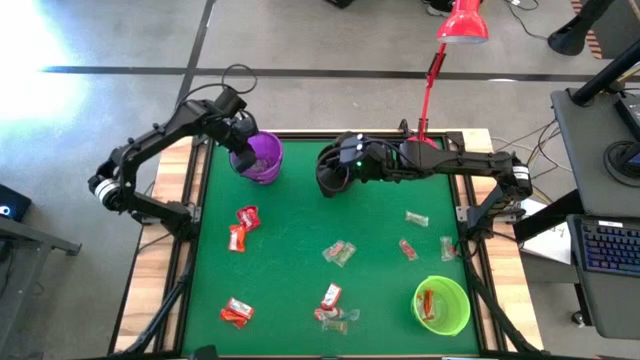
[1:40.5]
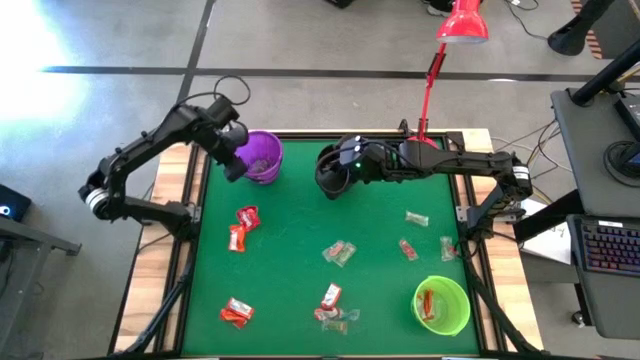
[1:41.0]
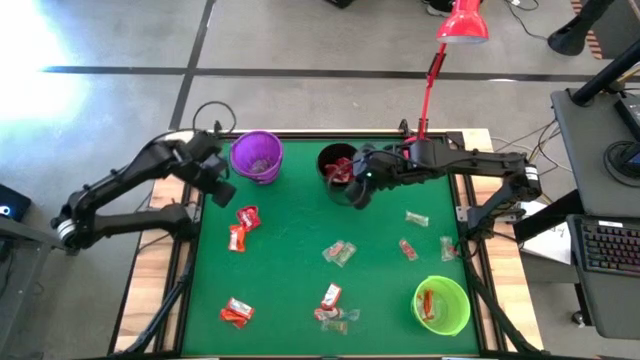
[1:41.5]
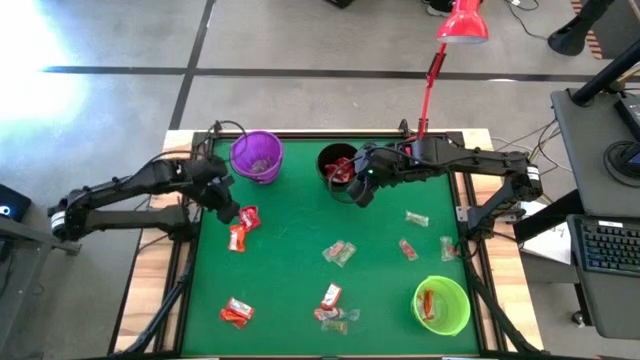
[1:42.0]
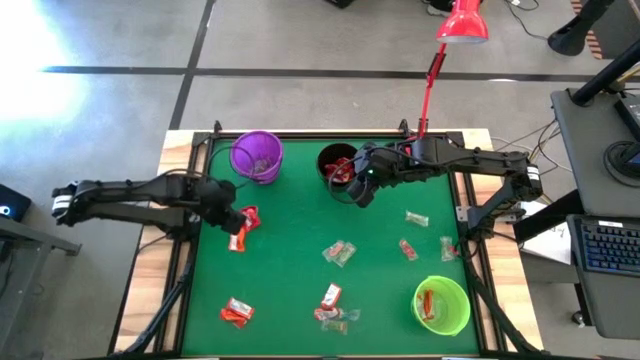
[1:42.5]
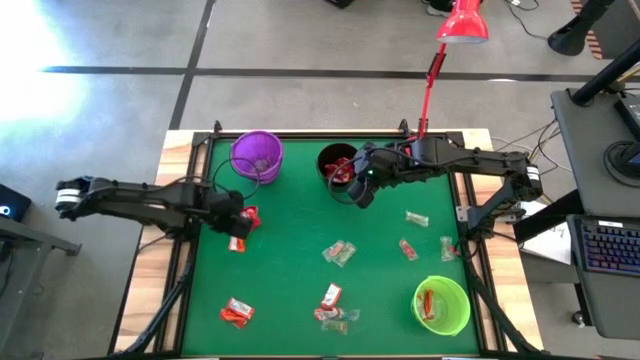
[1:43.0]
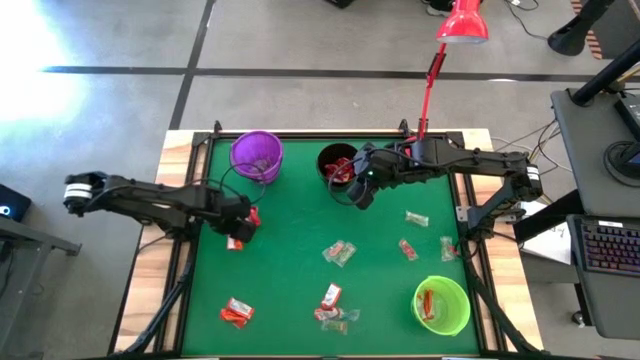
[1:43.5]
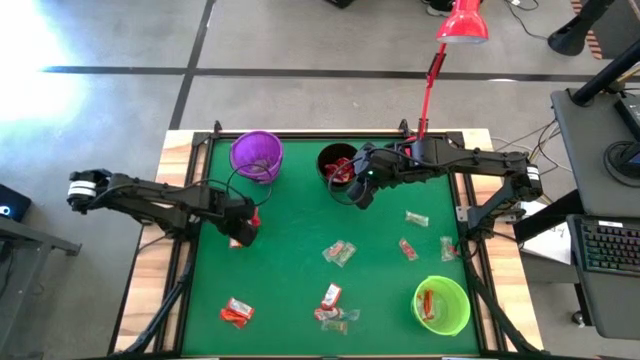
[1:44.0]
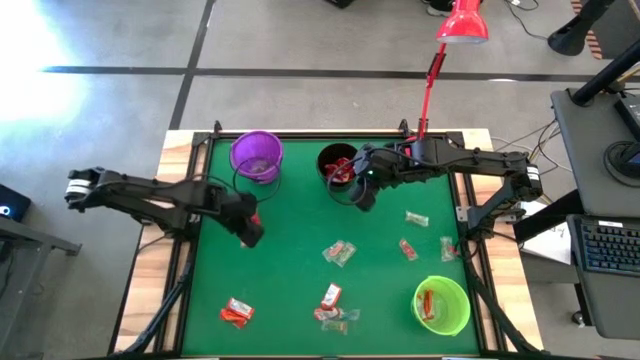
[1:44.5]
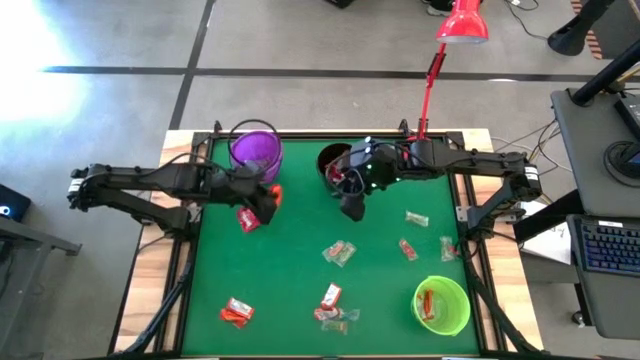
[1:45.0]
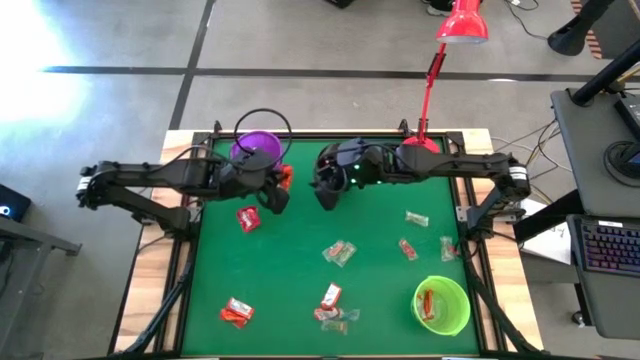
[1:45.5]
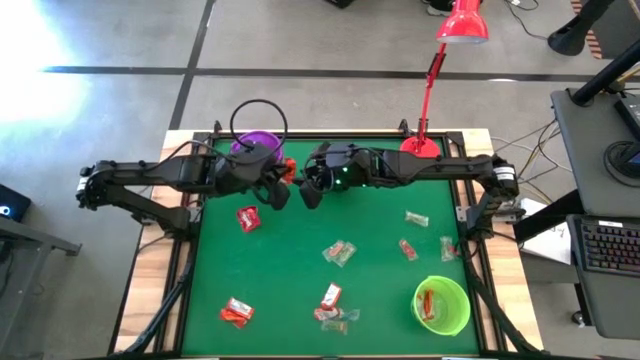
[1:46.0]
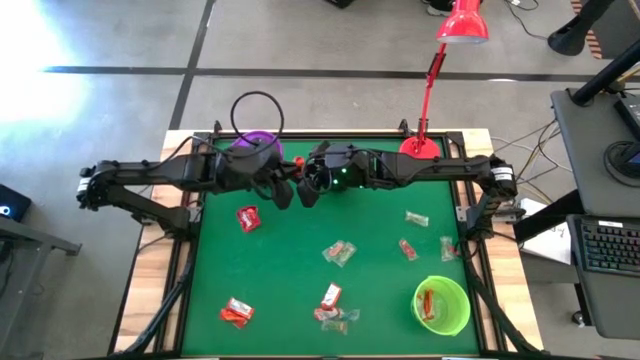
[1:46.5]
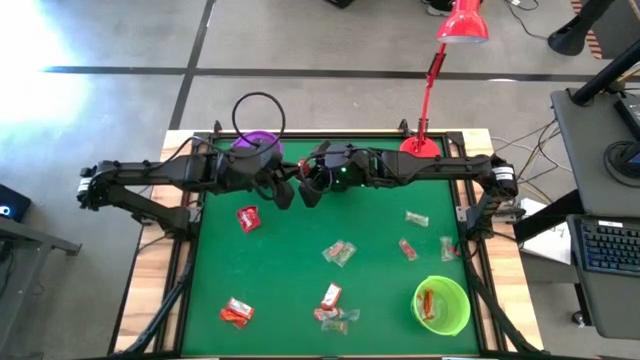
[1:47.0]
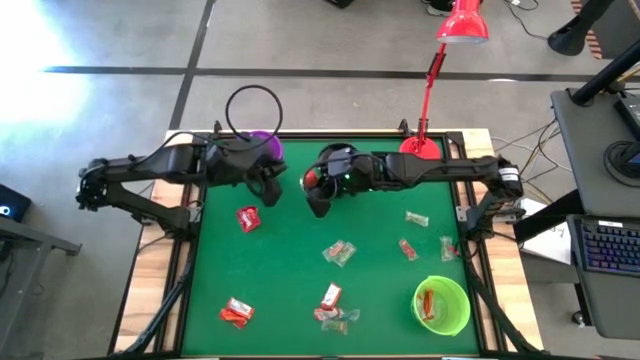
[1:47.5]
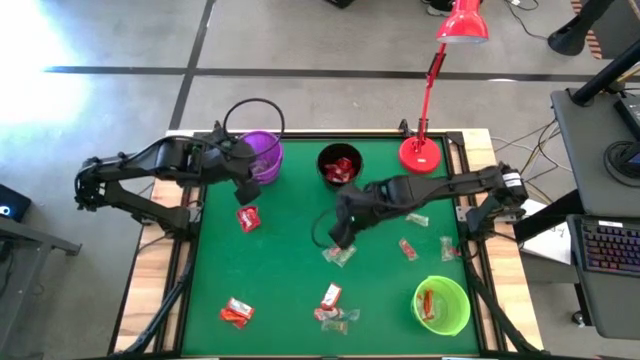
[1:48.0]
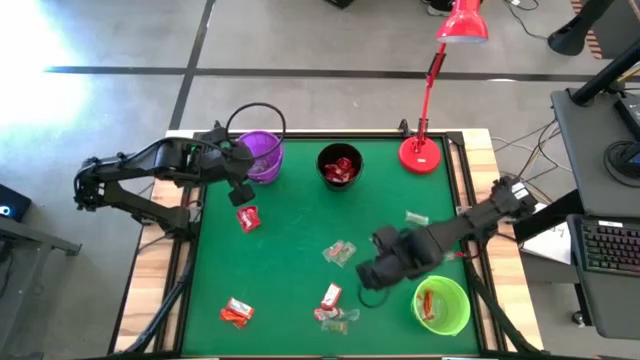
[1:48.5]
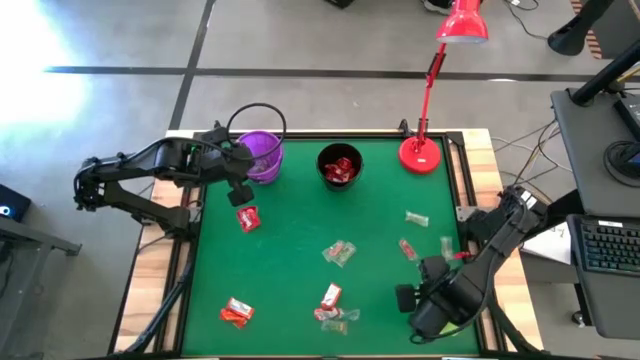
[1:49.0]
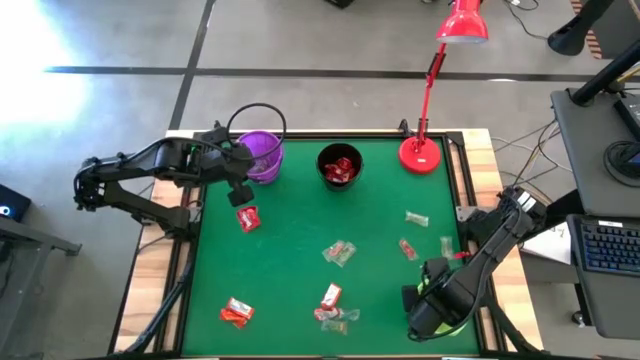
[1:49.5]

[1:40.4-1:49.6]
Task: Sort candy
Put the orange chocolate into the green bucket

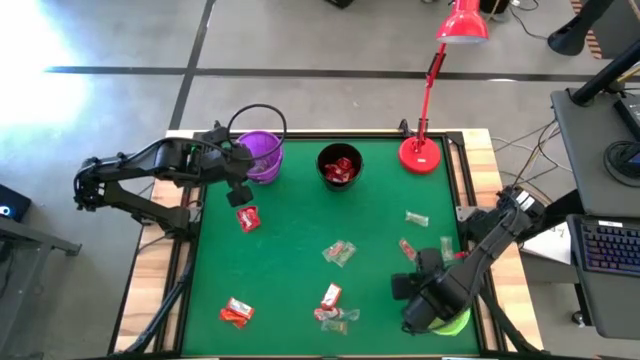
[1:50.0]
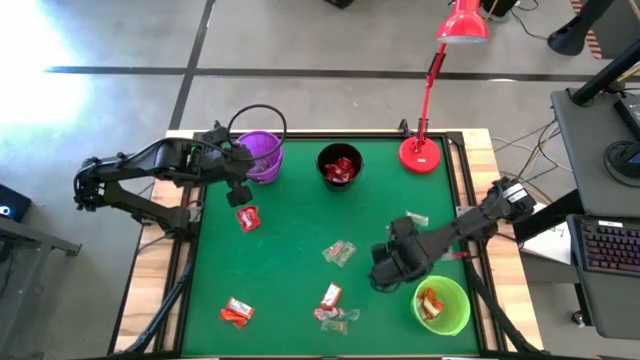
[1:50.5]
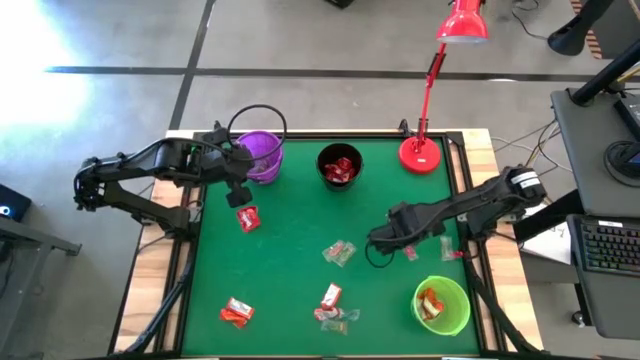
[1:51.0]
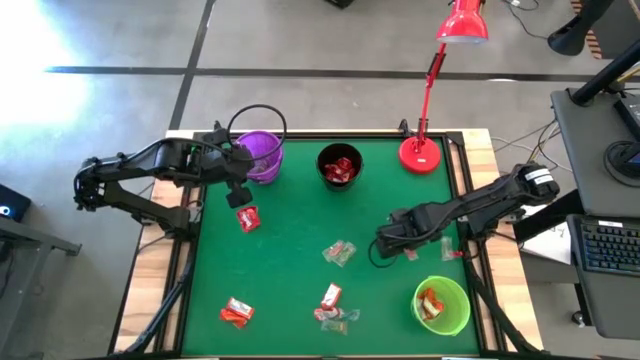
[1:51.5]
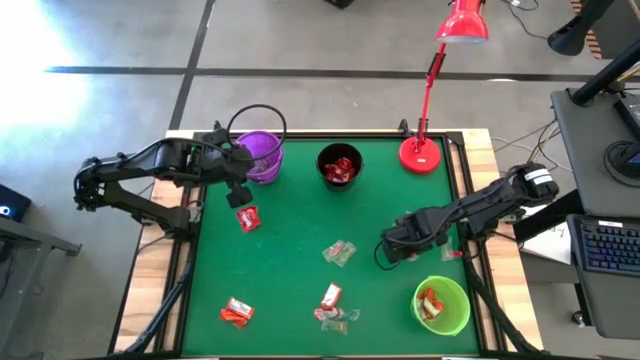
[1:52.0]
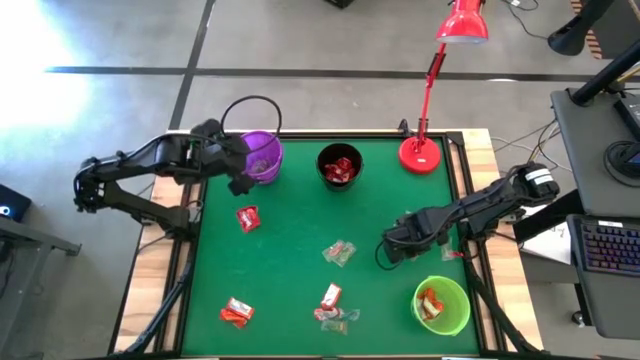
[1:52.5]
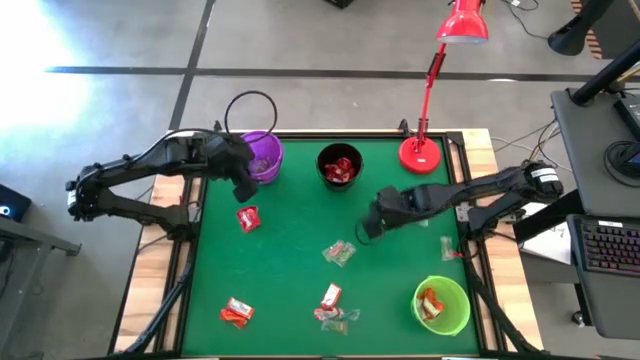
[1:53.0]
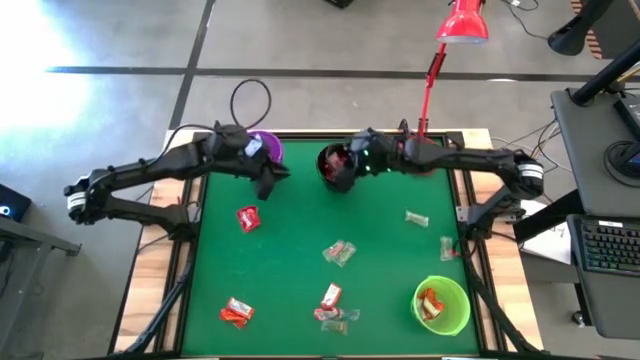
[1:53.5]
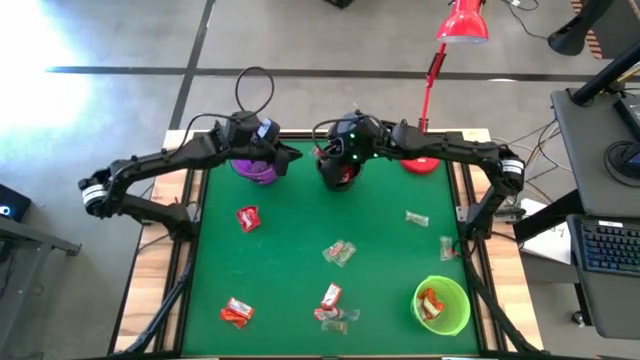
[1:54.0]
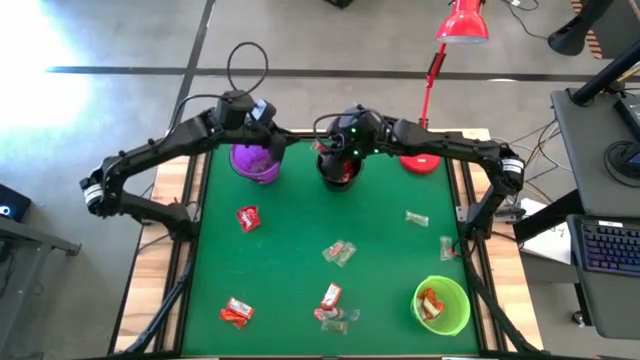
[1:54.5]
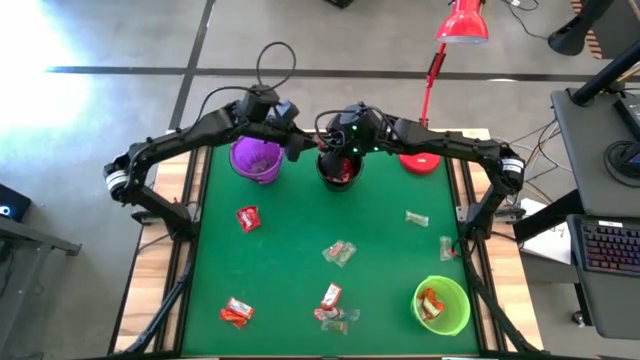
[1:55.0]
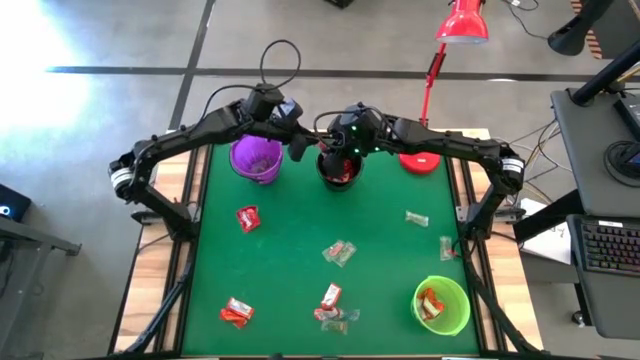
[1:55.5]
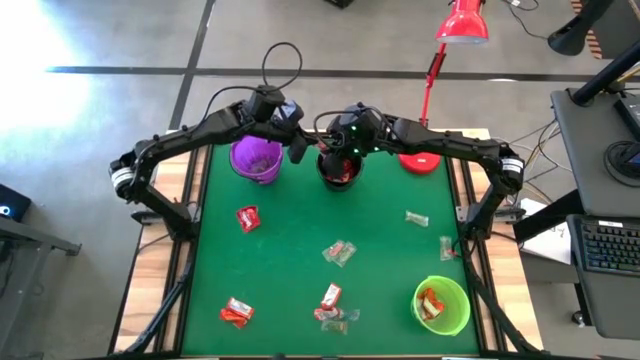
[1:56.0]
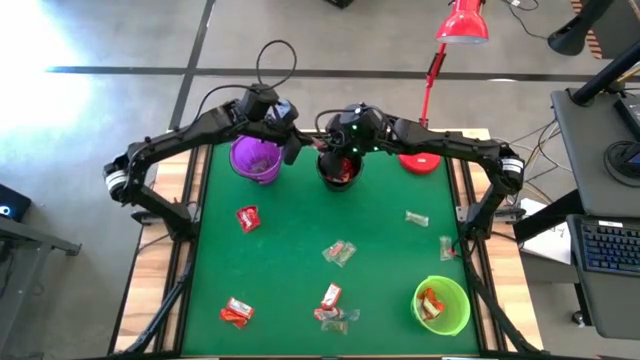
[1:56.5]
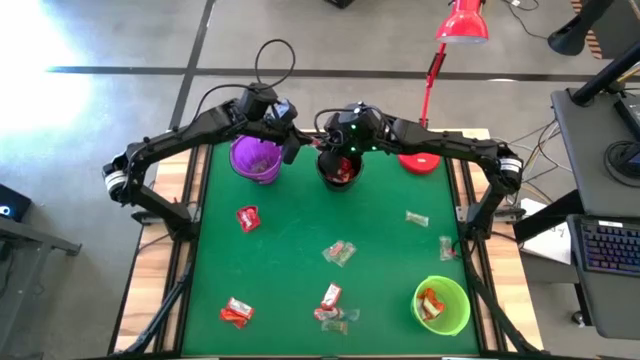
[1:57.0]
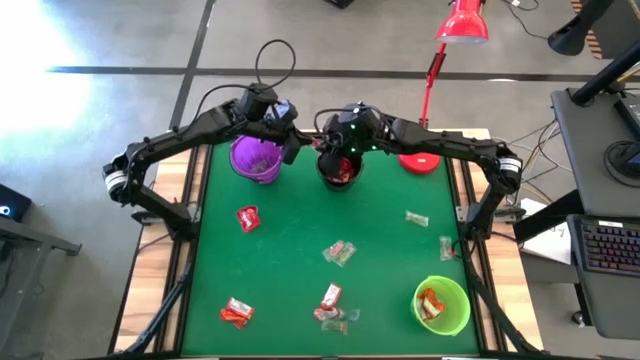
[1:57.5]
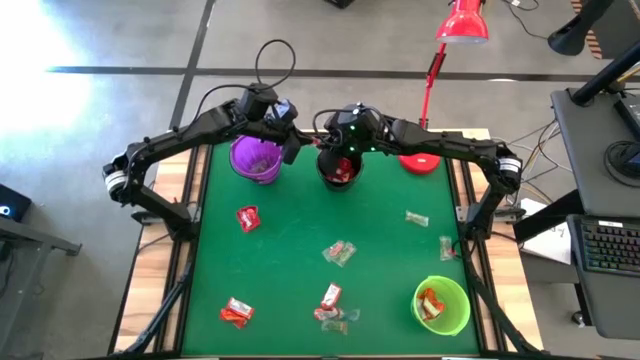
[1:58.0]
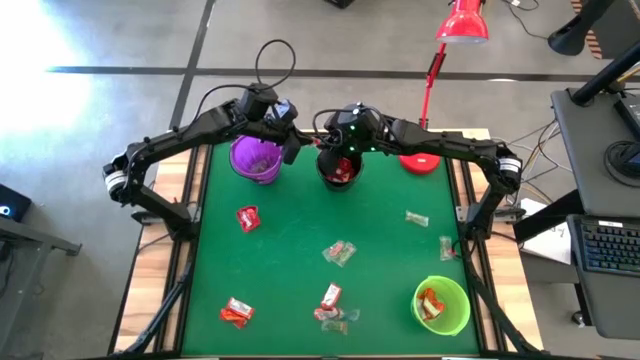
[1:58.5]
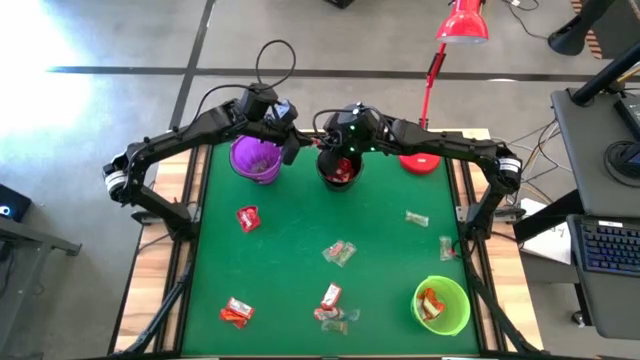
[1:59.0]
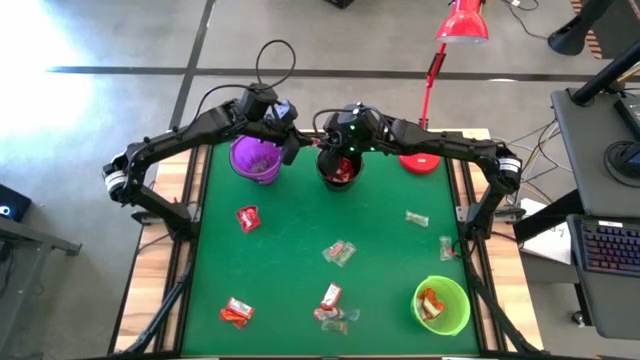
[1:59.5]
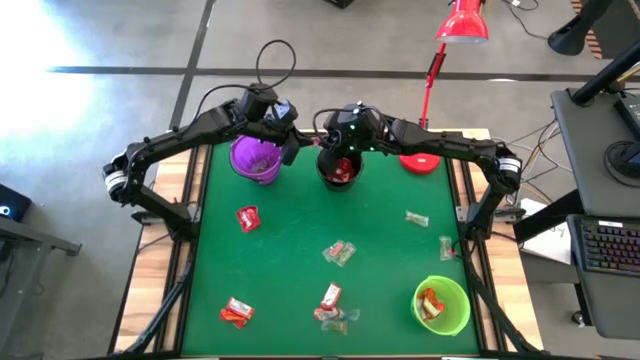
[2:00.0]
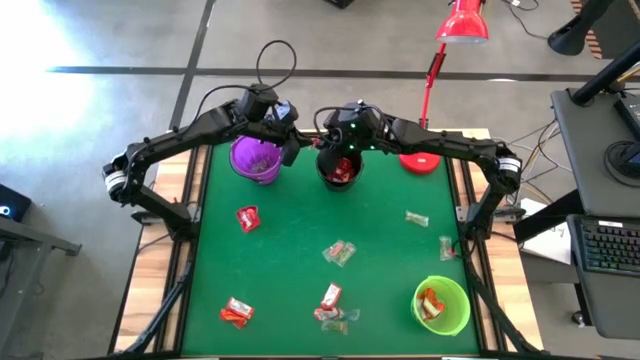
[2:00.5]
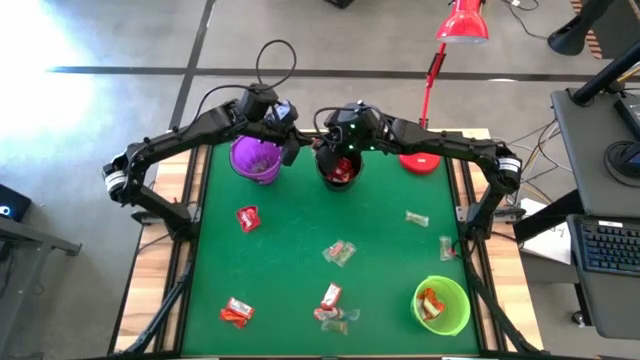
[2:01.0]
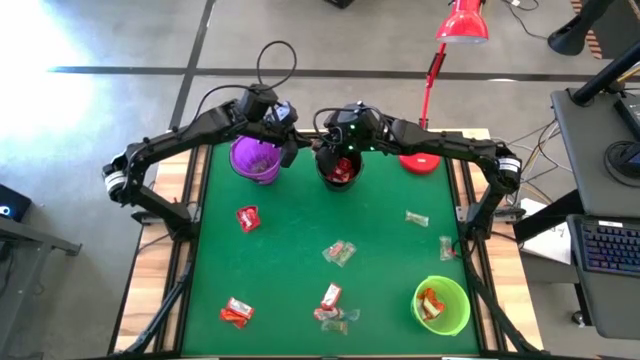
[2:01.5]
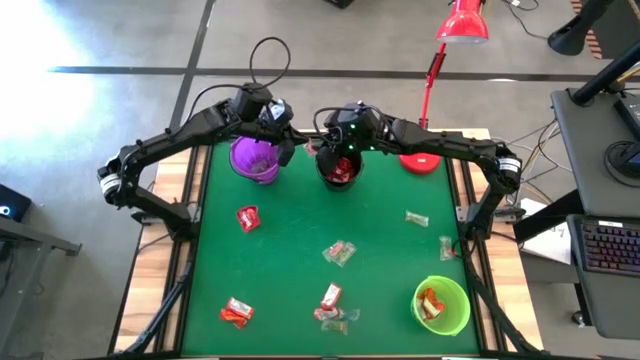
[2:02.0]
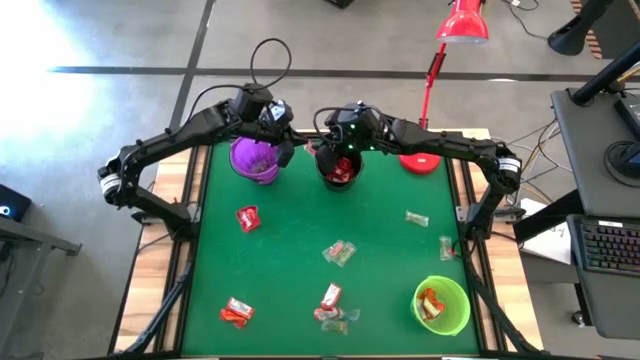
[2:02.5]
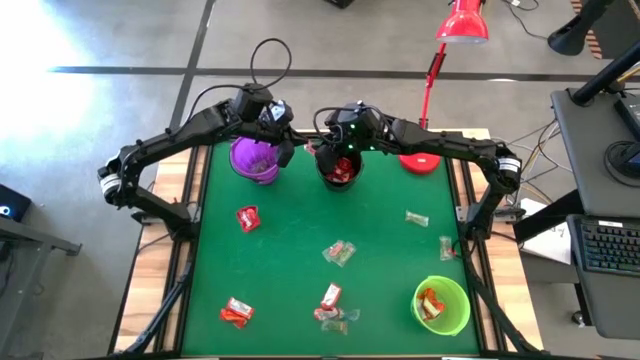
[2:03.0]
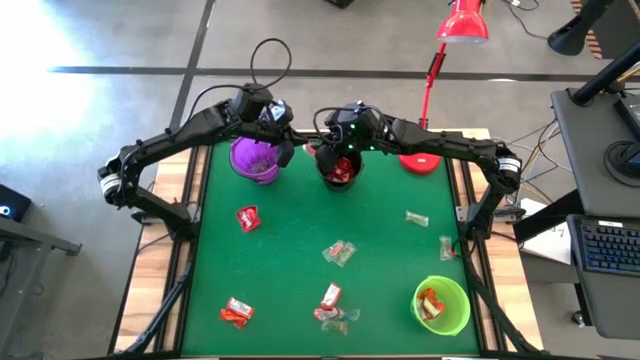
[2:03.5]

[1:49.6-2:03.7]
Put the red gummy into the violet bucket
